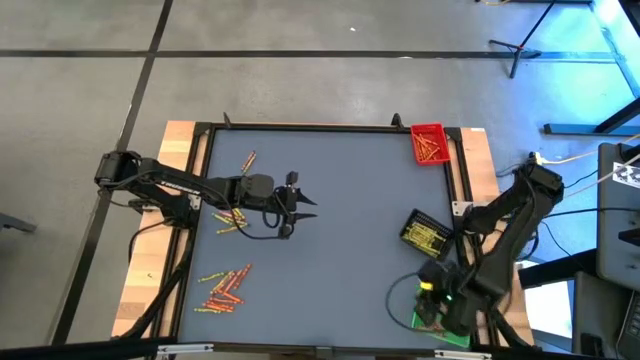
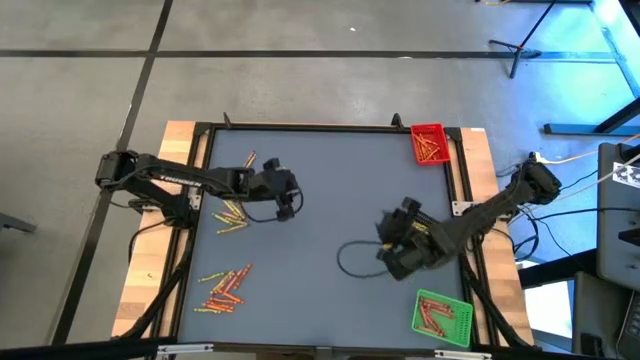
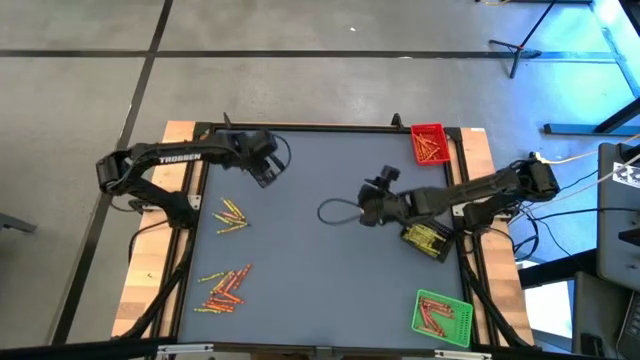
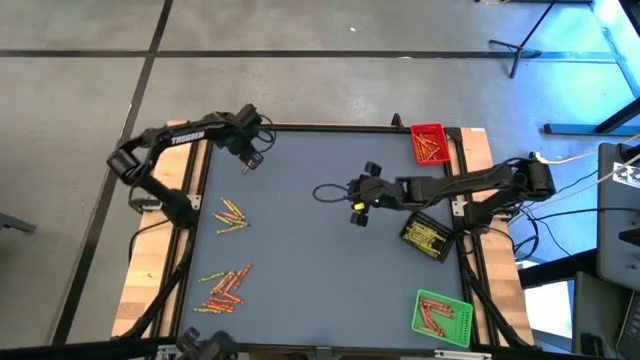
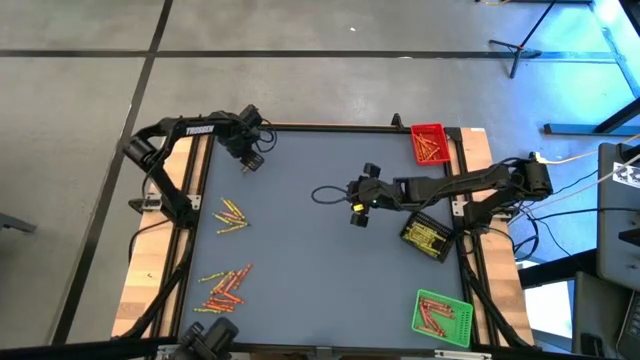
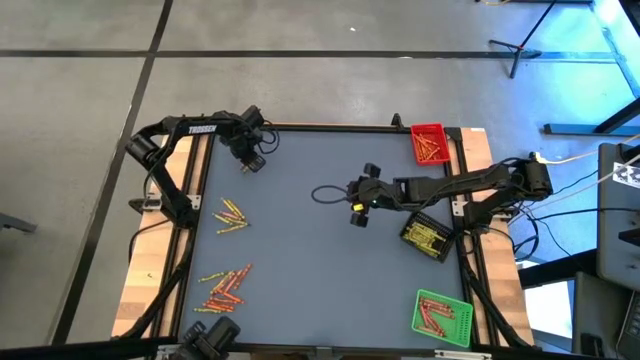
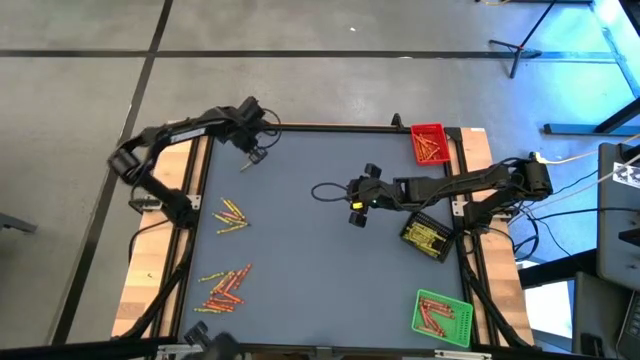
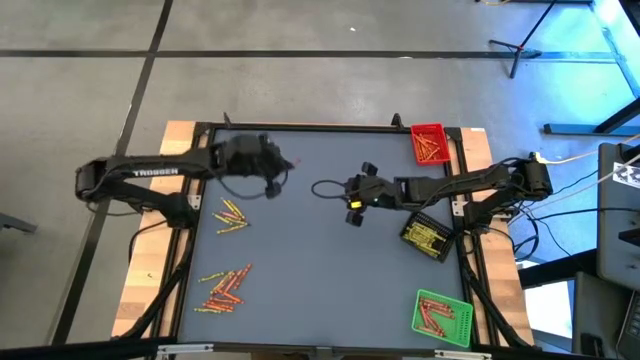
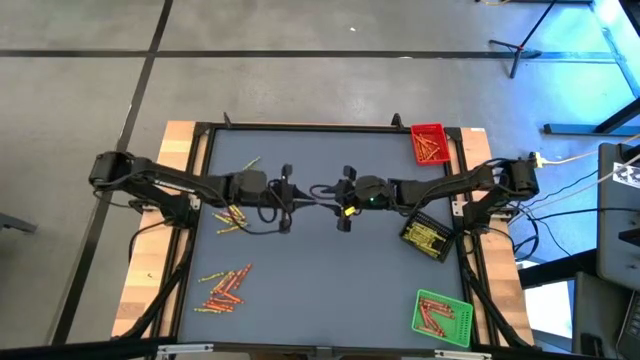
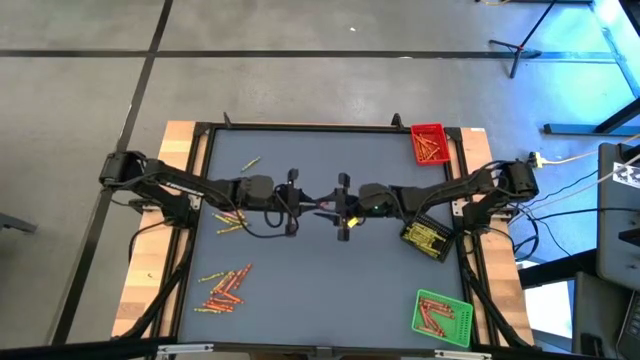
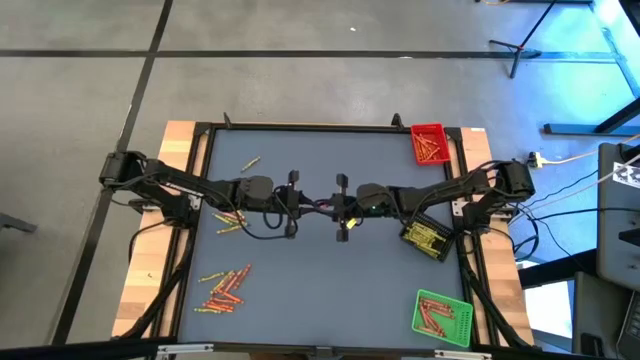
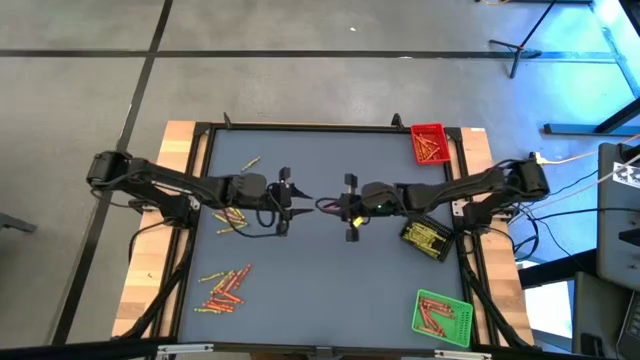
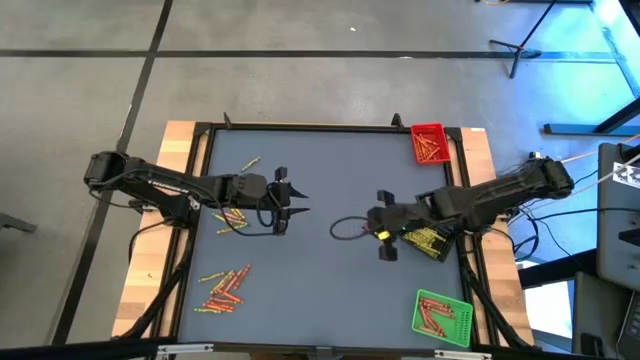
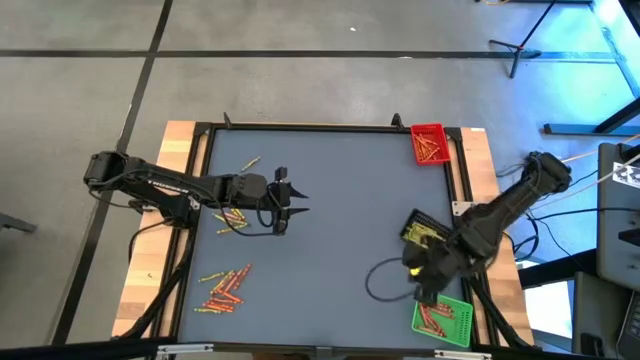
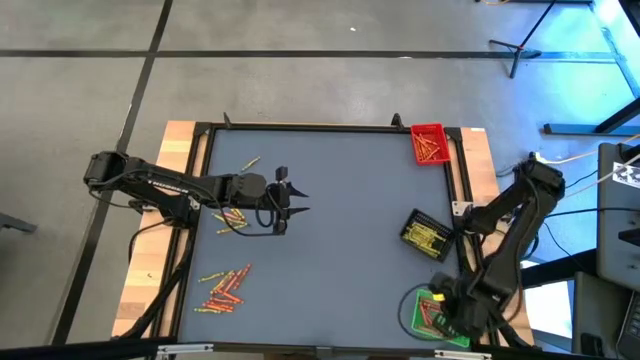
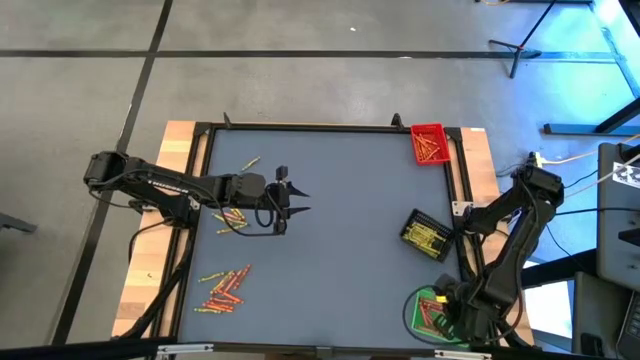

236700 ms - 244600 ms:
Task: Sort crayons
Put the red crayon into the green basket

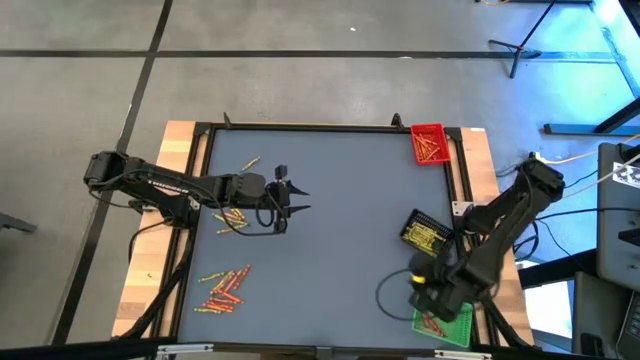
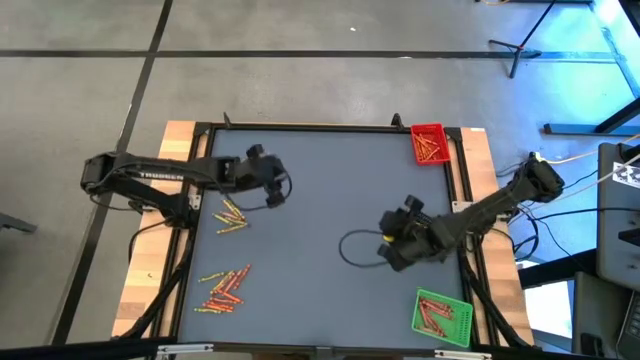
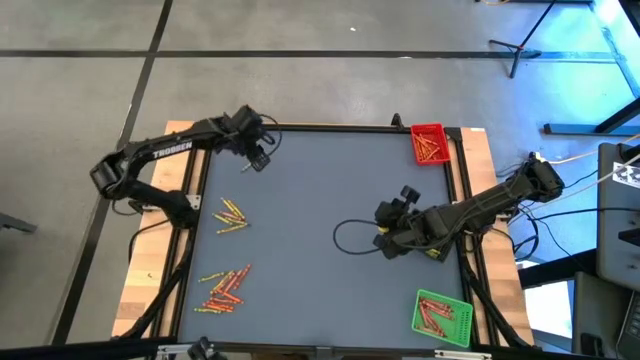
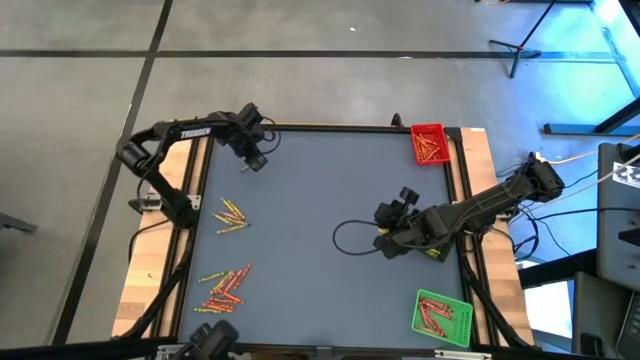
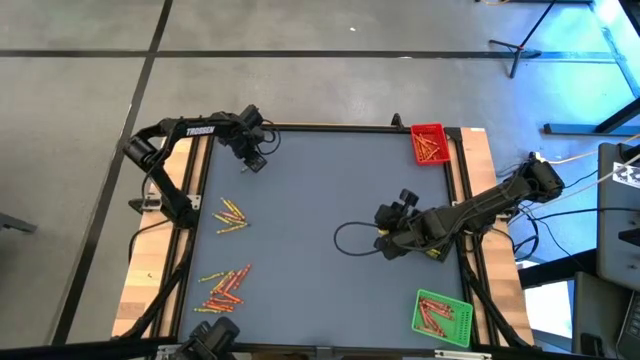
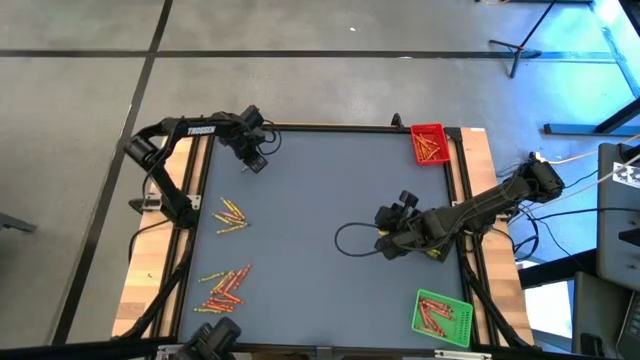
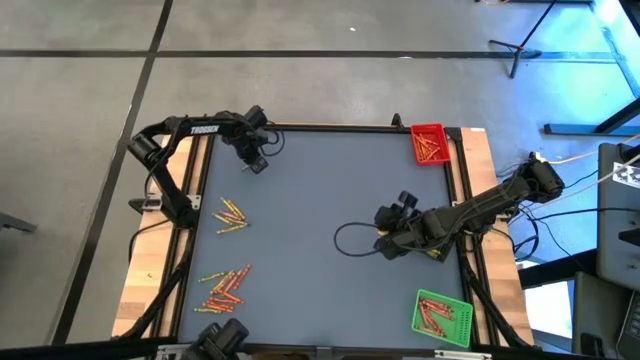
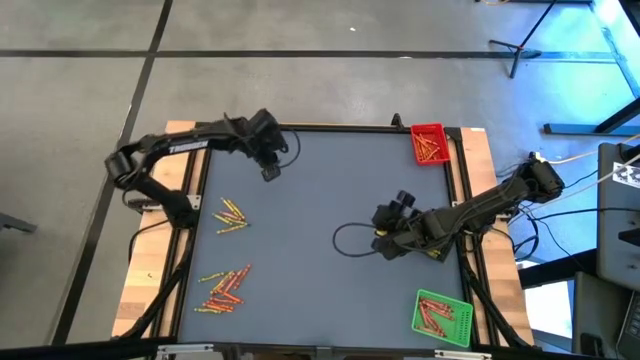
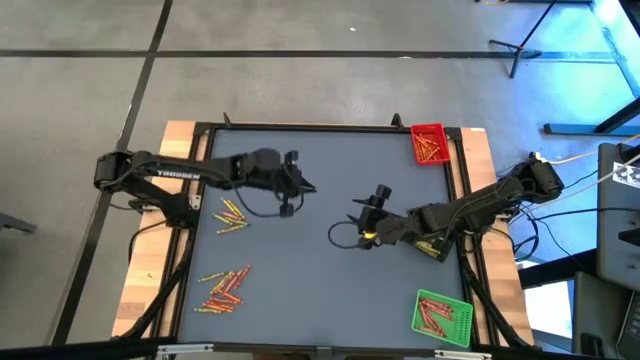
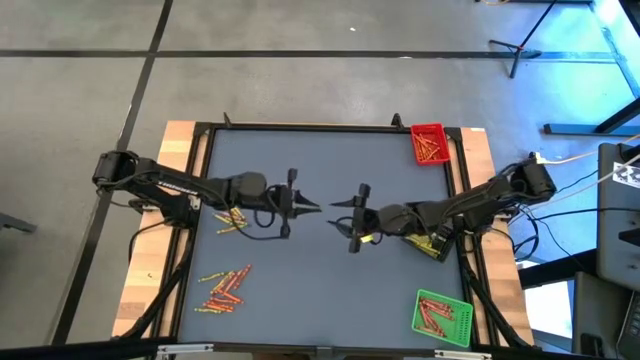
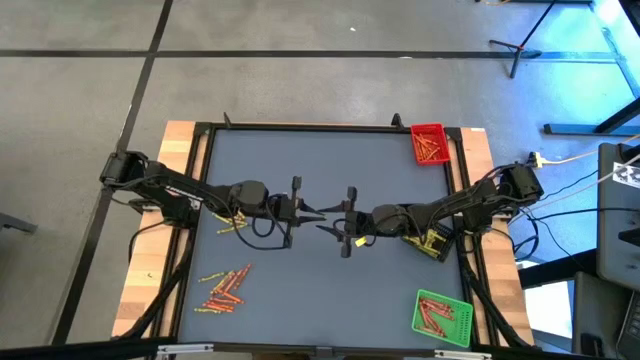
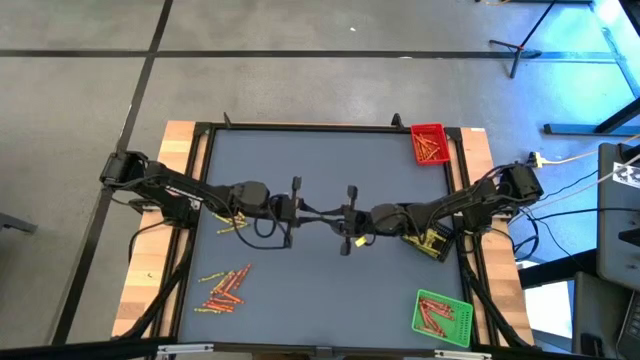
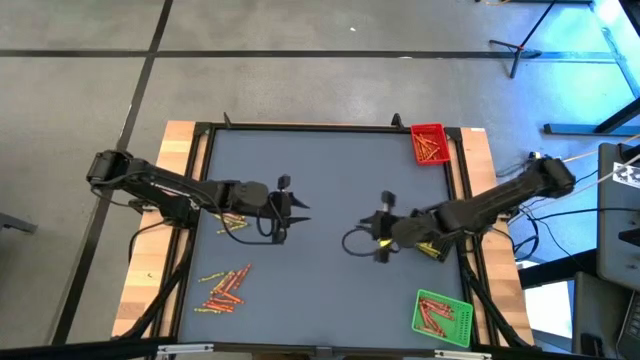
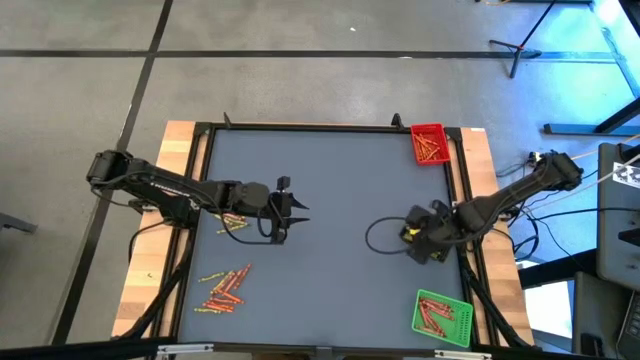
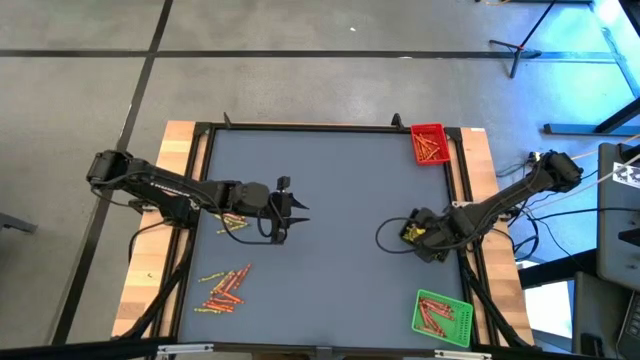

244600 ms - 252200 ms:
Put the yellow green crayon into the black basket

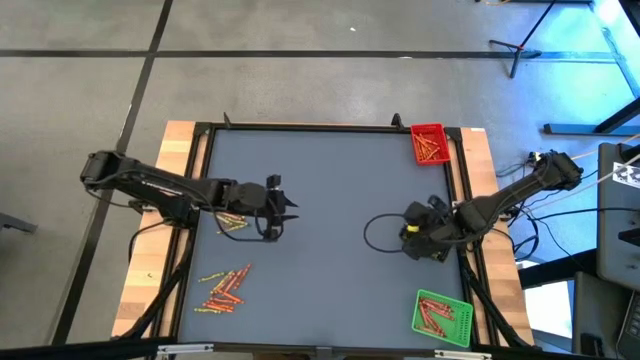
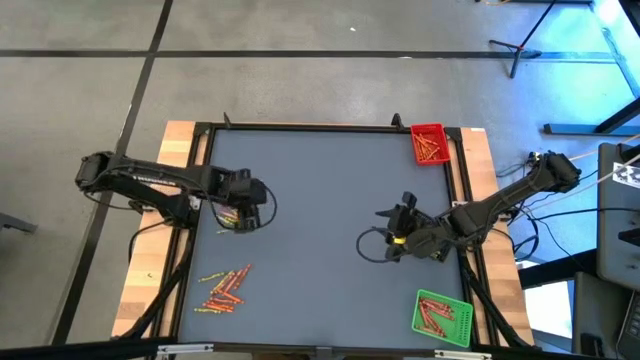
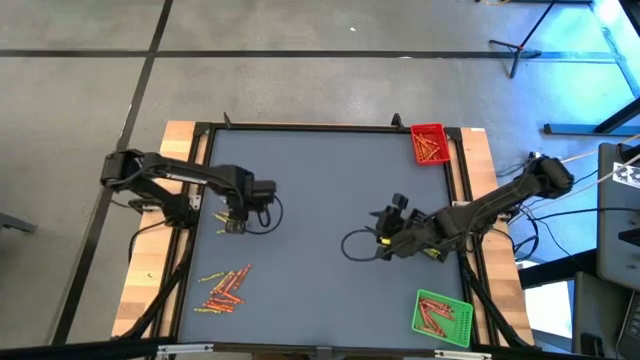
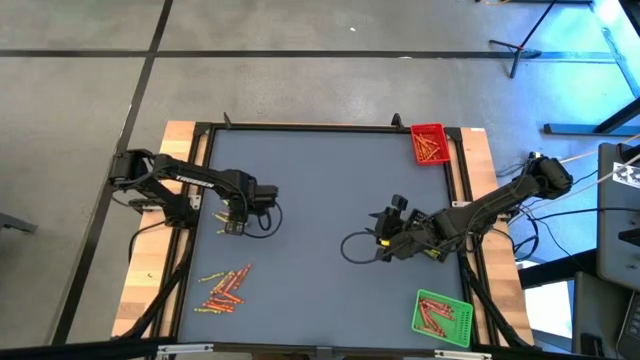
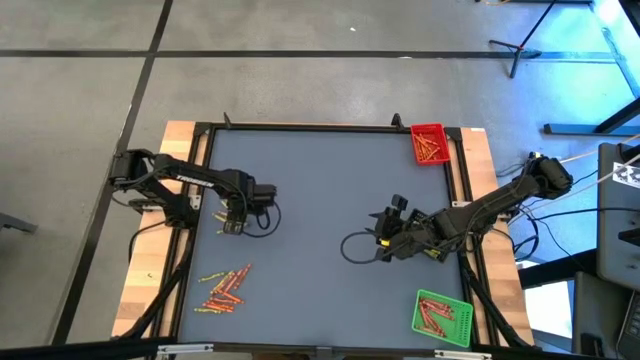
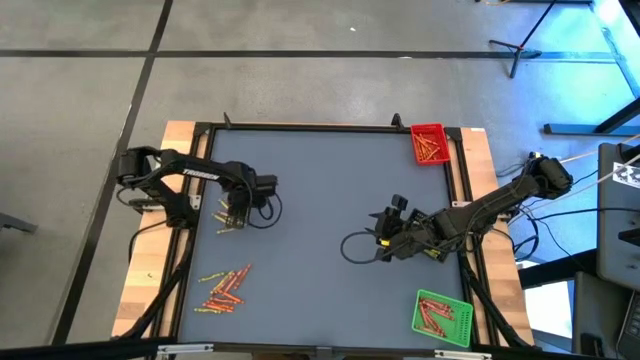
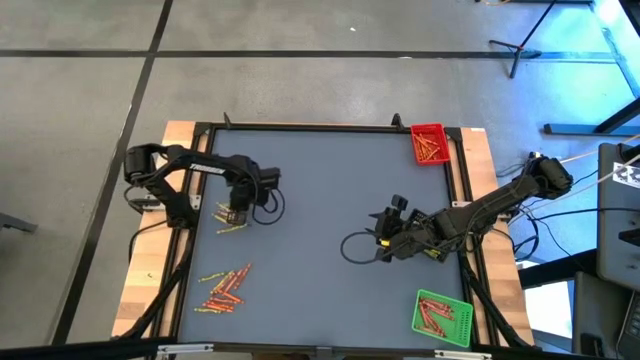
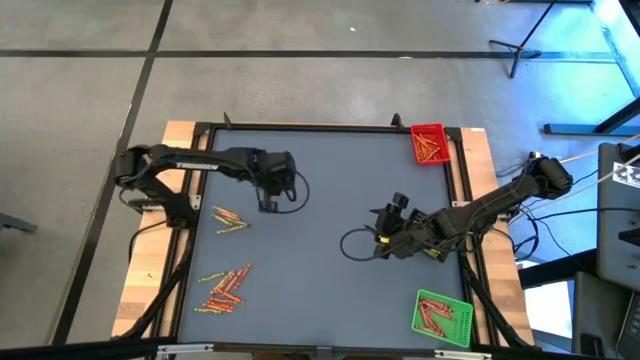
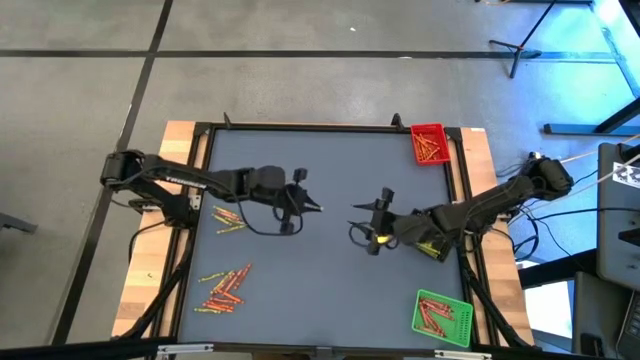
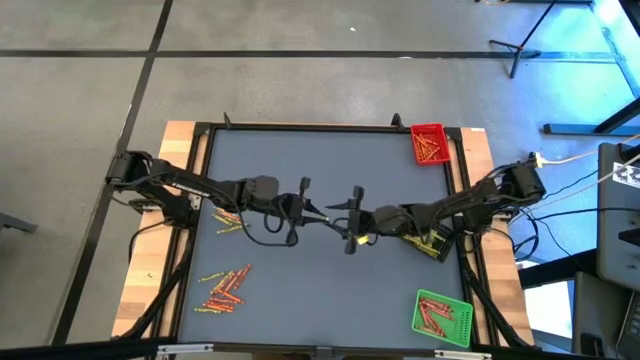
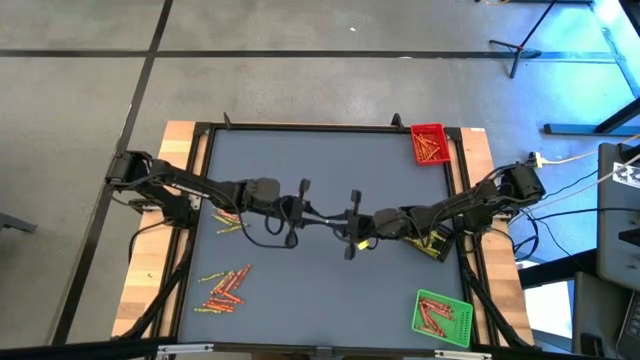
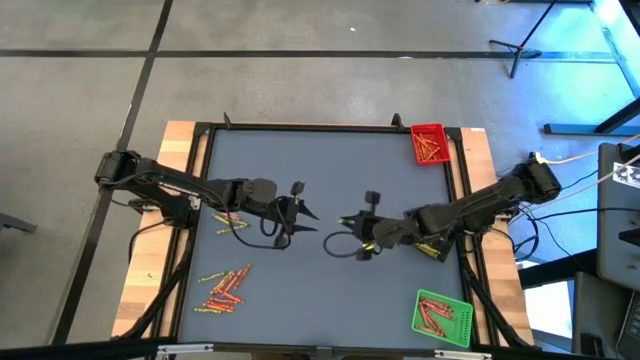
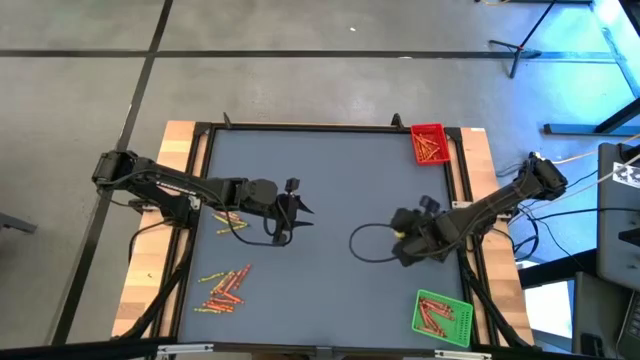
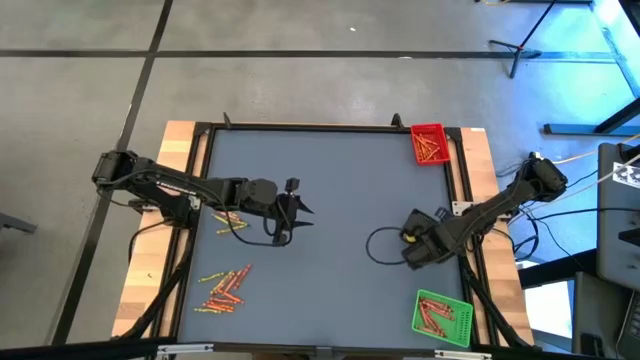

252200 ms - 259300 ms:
Put the yellow green crayon into the black basket
